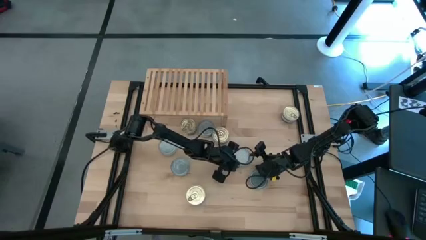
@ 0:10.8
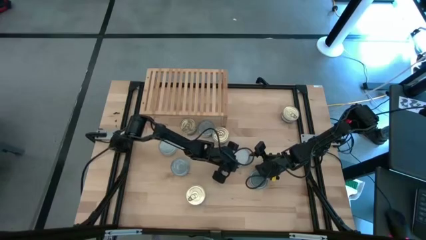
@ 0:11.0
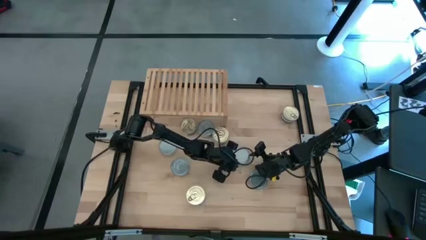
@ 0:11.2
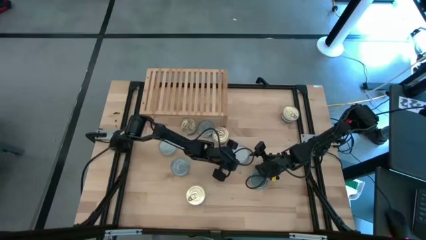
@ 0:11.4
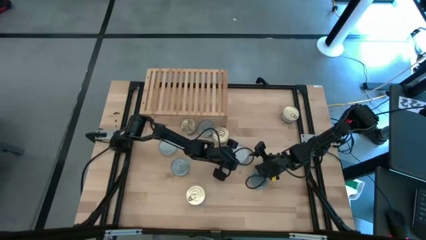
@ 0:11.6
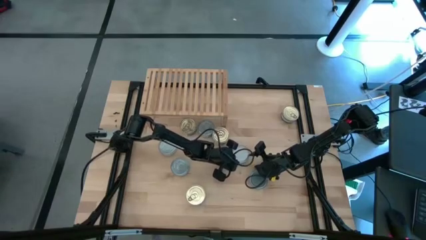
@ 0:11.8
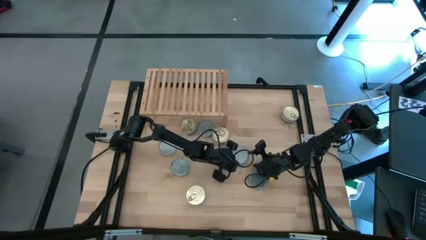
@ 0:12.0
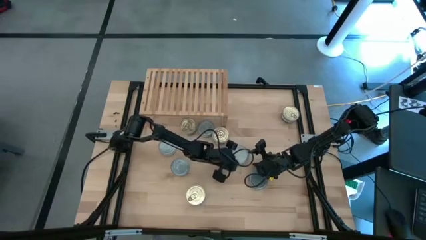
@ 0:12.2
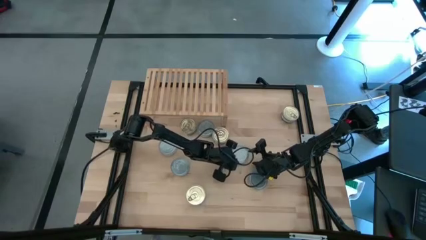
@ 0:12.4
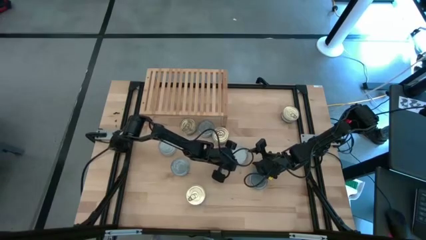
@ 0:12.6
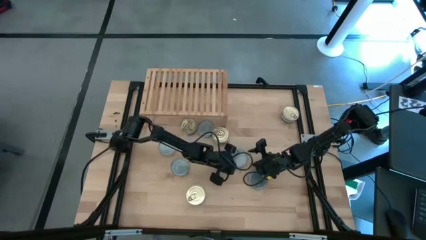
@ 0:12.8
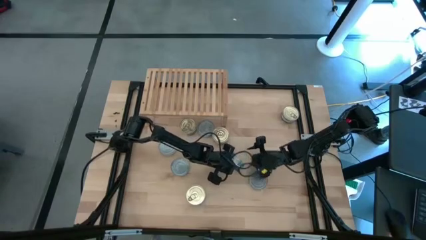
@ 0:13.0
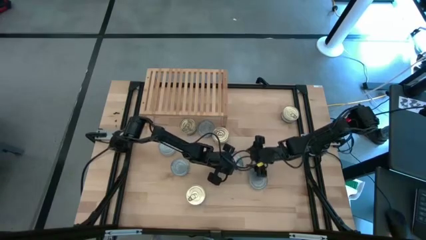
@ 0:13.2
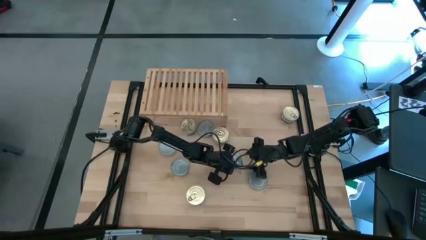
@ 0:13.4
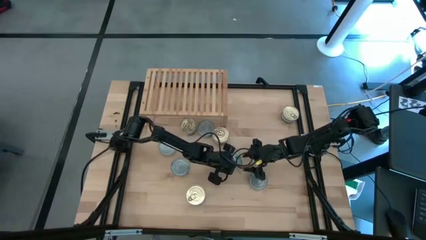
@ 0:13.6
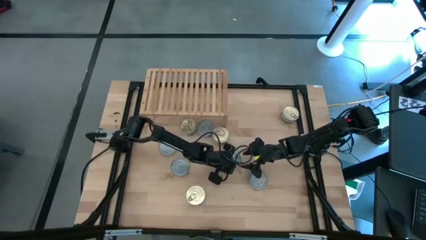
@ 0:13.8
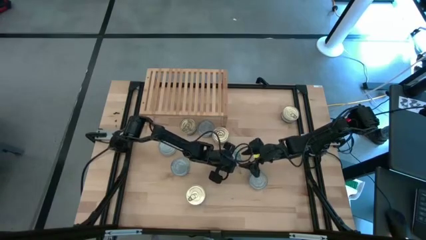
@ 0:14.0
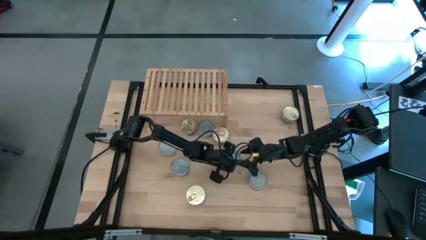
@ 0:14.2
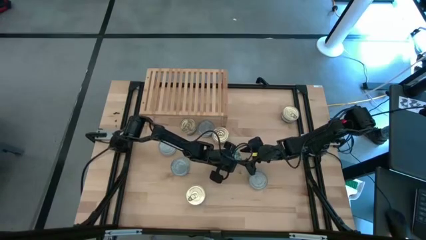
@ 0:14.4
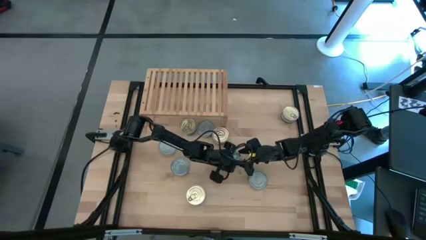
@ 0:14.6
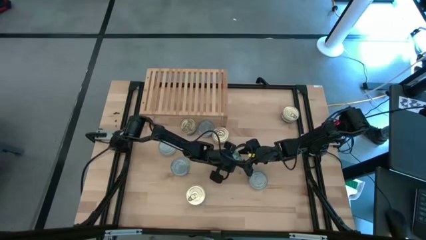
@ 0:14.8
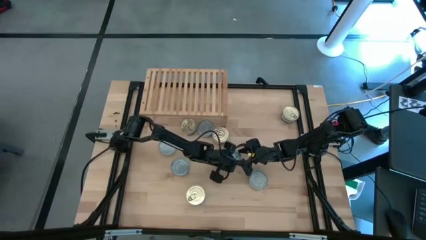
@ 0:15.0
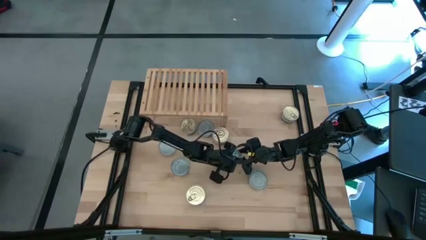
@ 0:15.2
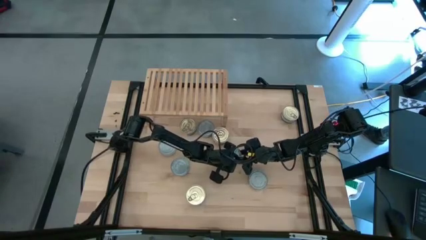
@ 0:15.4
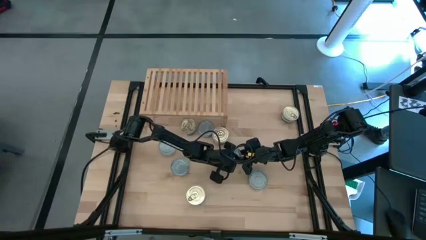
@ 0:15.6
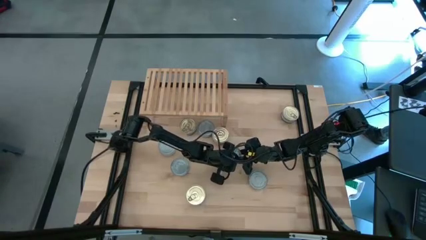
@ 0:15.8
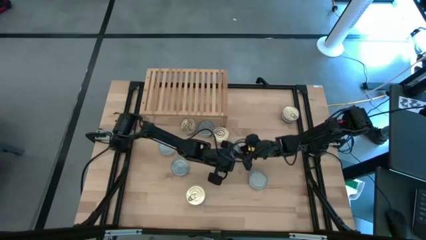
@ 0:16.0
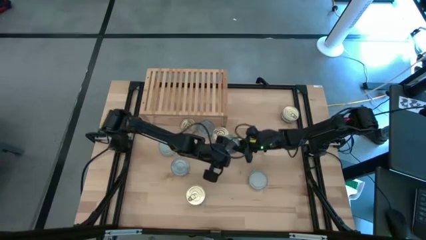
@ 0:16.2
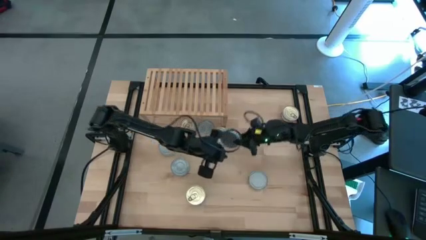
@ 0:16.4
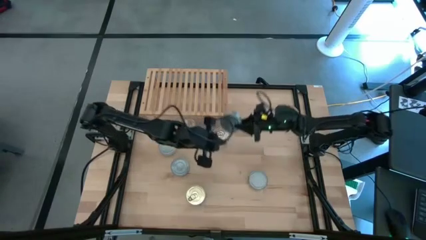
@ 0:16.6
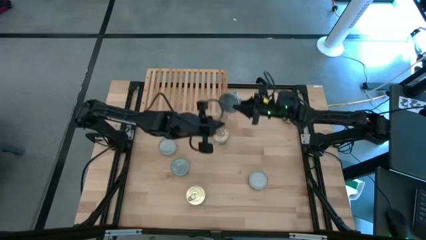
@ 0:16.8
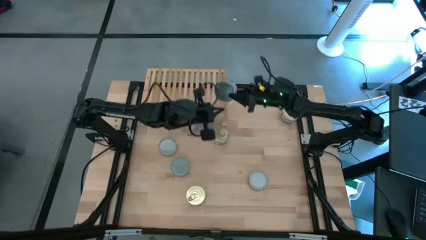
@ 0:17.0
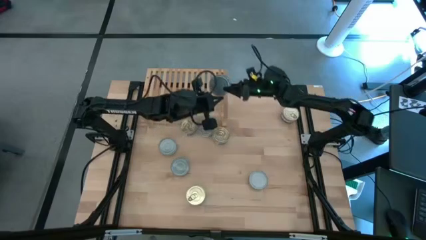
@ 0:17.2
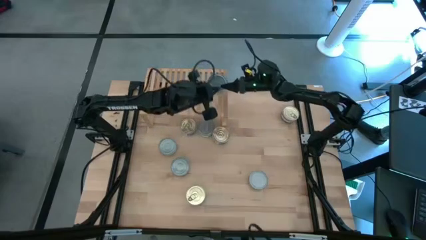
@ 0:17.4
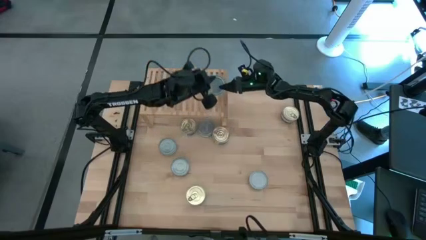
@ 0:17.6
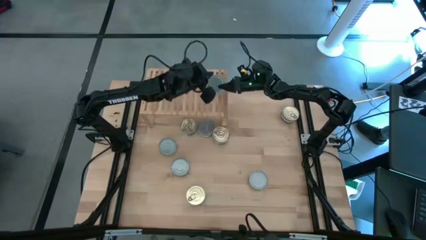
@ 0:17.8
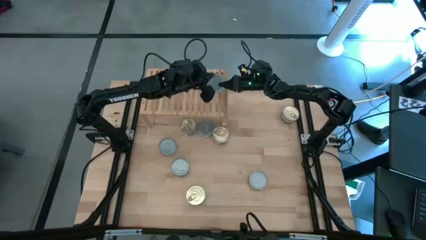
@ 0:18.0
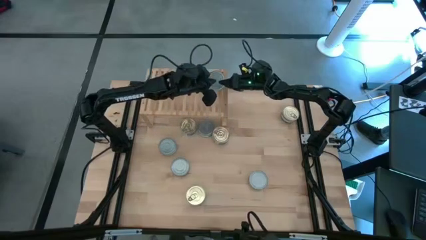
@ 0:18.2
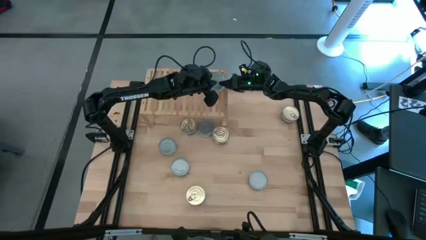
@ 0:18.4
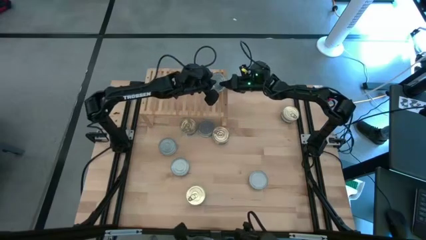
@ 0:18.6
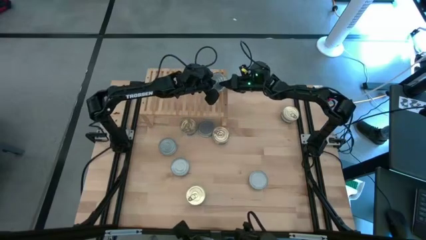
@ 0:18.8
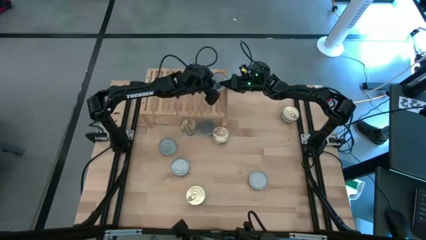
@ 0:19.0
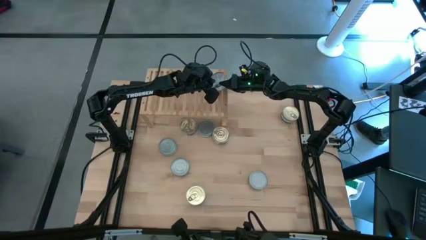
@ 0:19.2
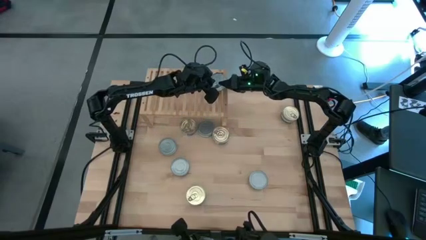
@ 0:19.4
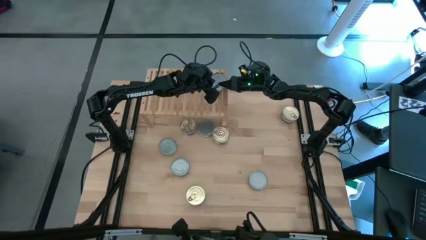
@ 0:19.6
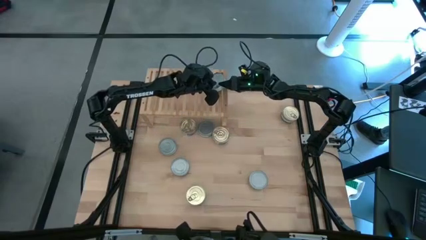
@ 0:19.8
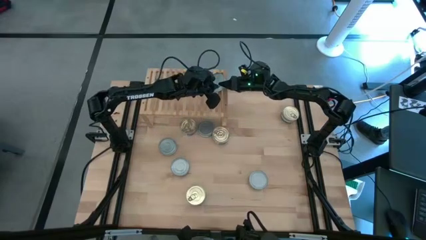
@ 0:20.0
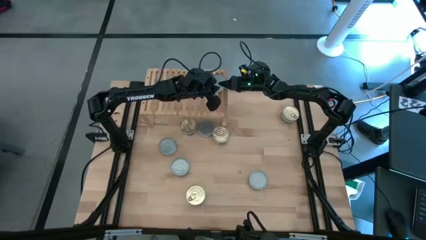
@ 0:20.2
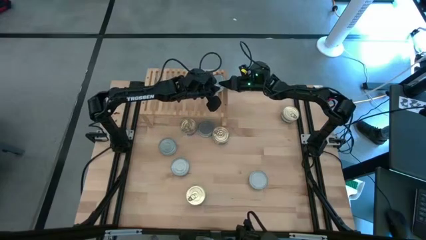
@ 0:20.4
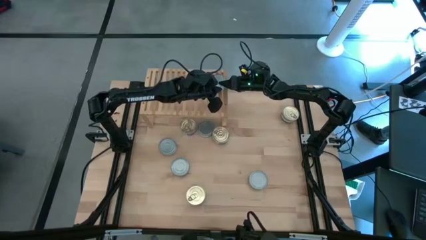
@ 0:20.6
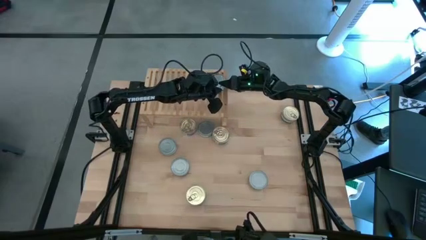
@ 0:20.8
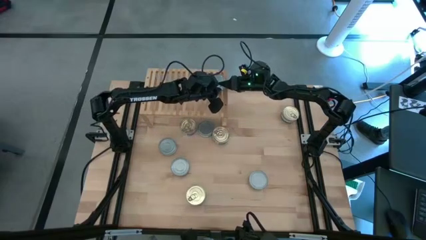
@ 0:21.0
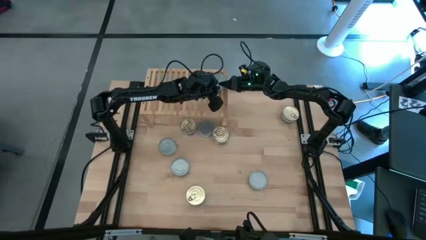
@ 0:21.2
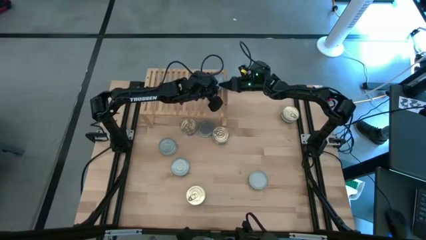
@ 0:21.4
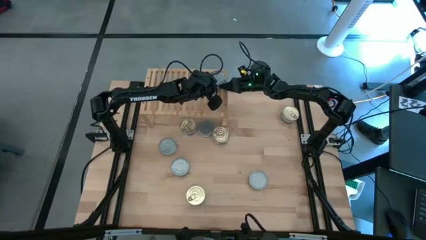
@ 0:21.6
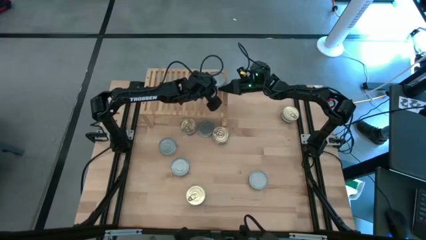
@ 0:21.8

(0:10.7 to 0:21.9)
Task: Stack canned seafood by type on shelf
Put the green tuna can on the shelf

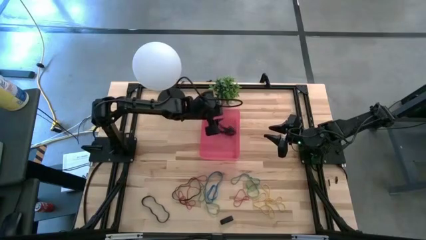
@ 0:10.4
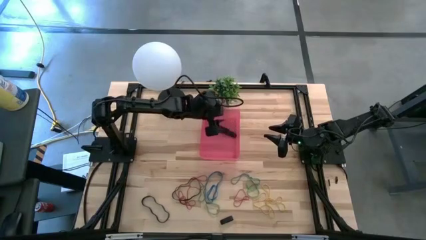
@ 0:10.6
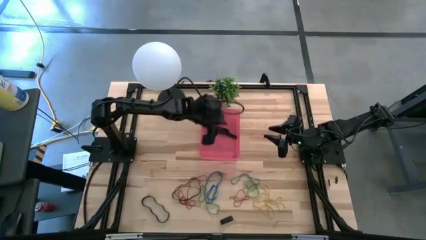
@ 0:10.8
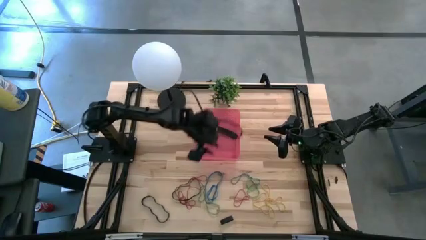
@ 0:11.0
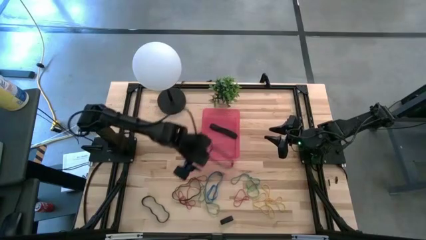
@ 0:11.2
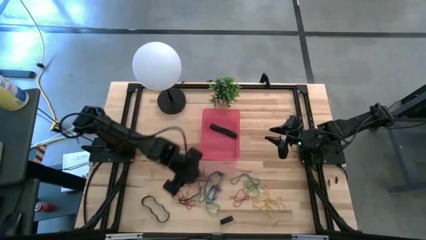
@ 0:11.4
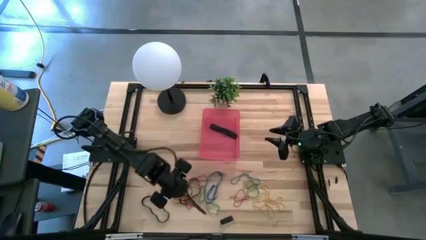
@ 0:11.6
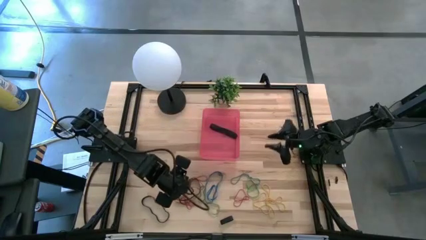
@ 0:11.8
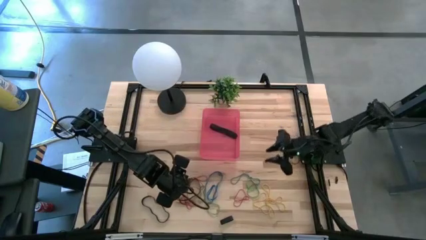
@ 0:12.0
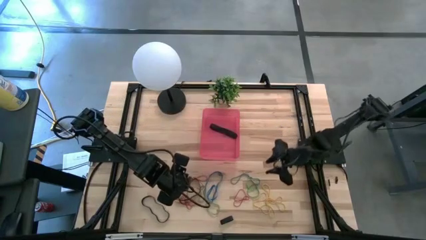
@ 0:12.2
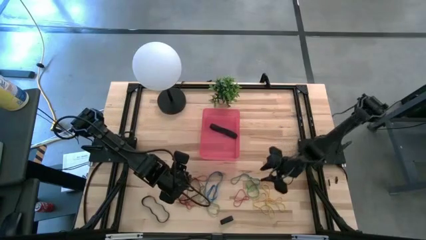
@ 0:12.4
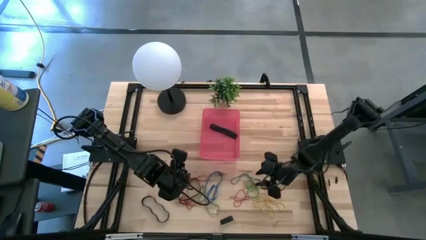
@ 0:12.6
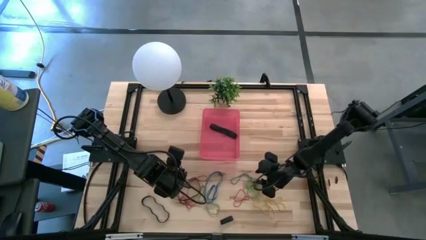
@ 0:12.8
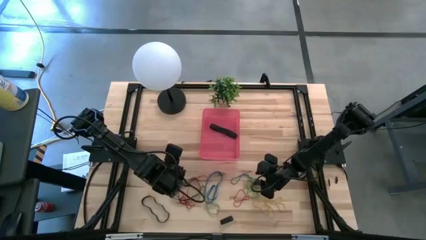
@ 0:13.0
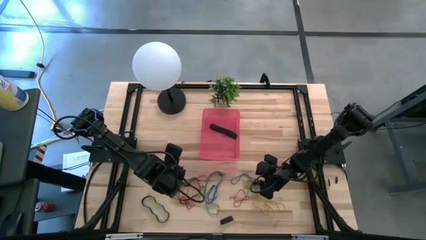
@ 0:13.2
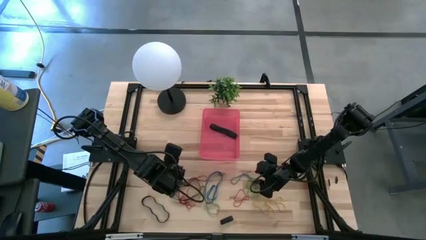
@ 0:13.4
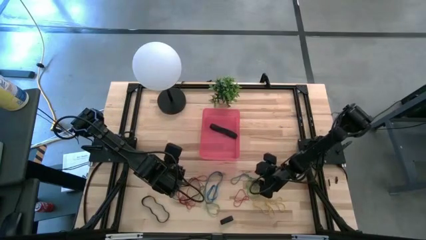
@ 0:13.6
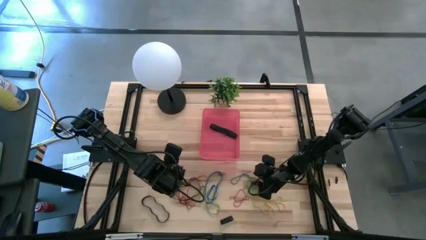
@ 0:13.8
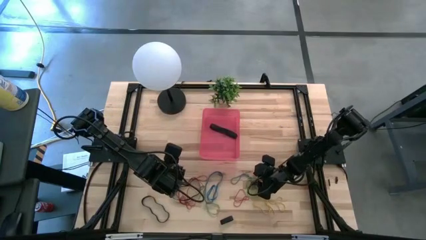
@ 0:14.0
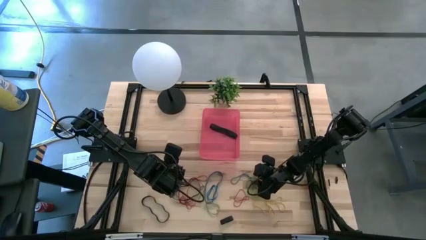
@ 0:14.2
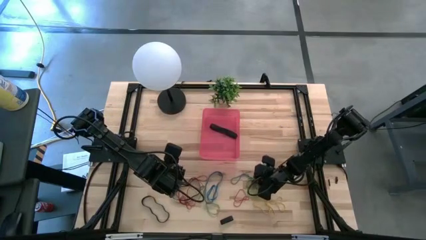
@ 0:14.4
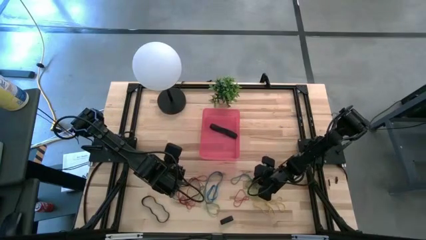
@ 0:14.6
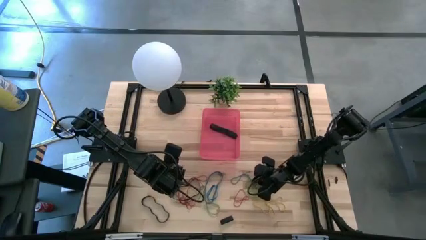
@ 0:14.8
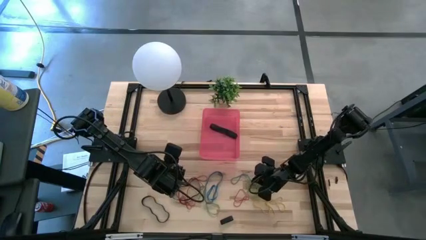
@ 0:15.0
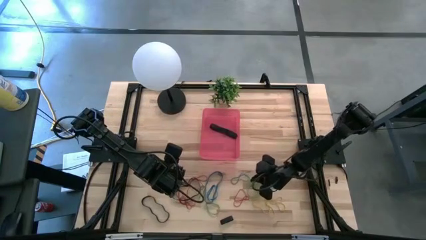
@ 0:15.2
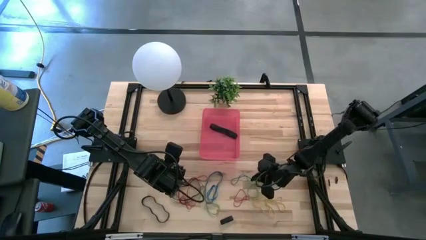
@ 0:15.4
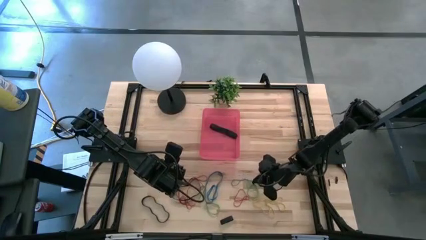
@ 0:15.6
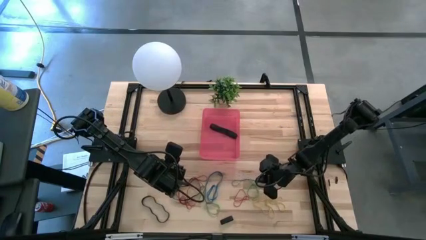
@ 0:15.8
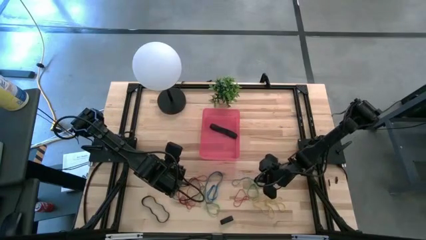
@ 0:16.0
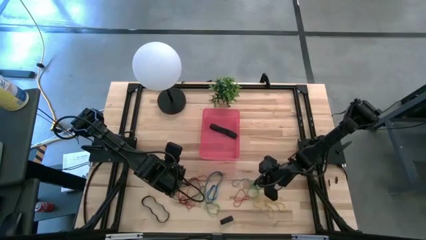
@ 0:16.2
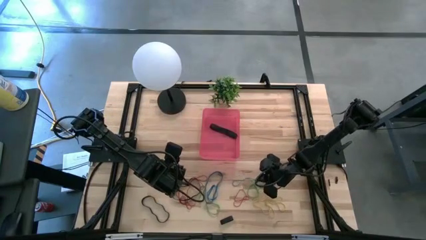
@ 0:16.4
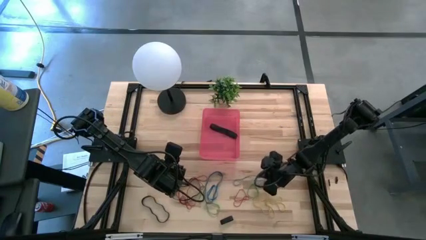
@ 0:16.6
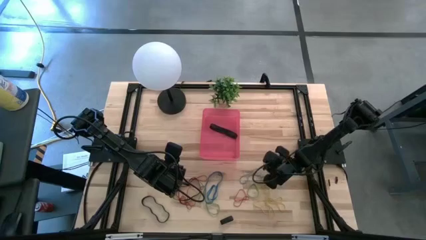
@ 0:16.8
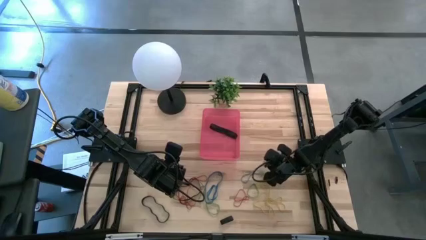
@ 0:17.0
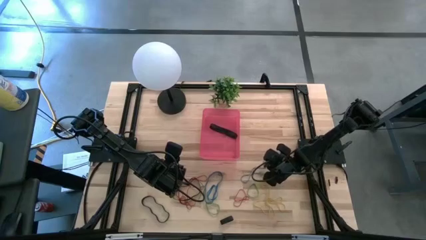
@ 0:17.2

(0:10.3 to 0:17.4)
Task: Pick and place rubber bands into bin
Put the green rubber band into the red bin
